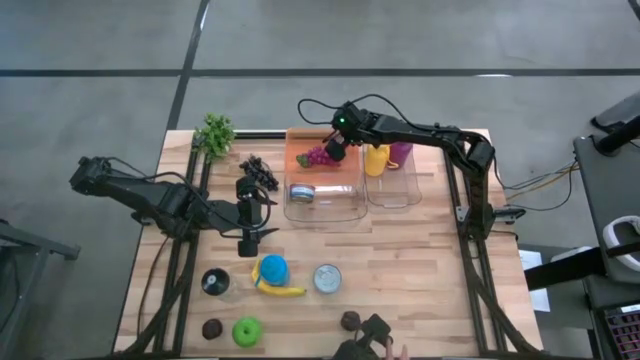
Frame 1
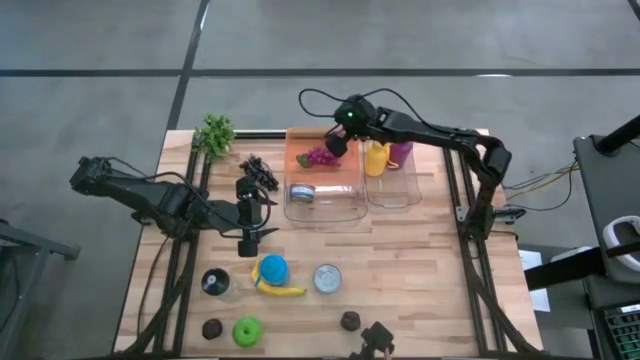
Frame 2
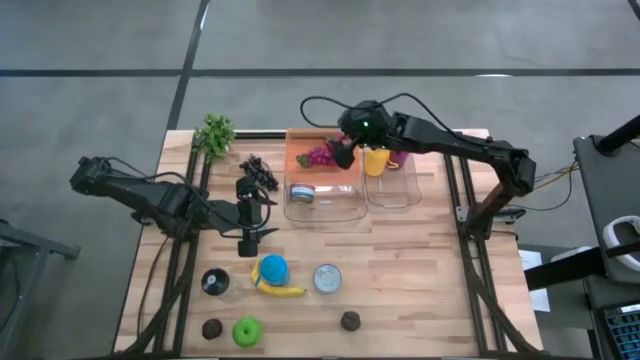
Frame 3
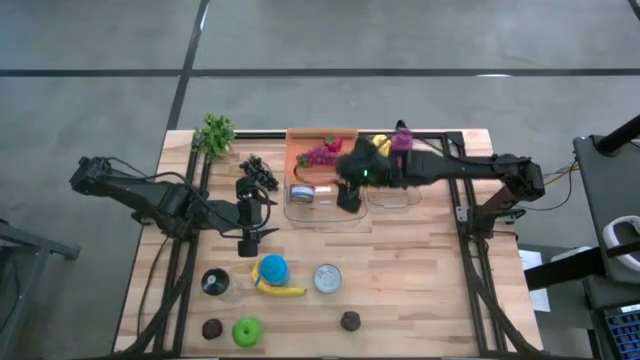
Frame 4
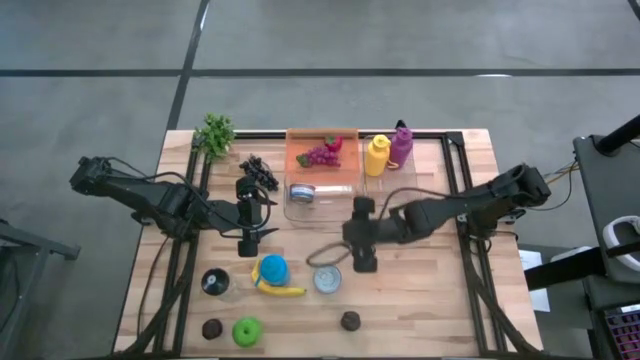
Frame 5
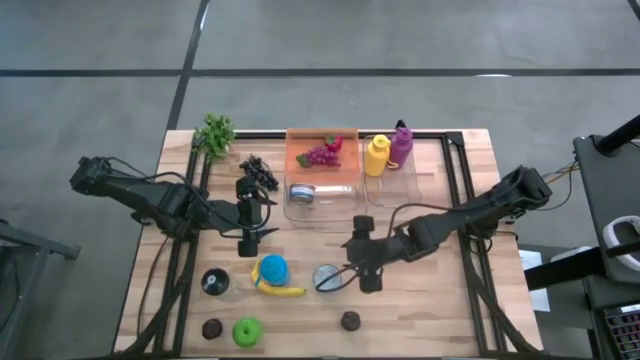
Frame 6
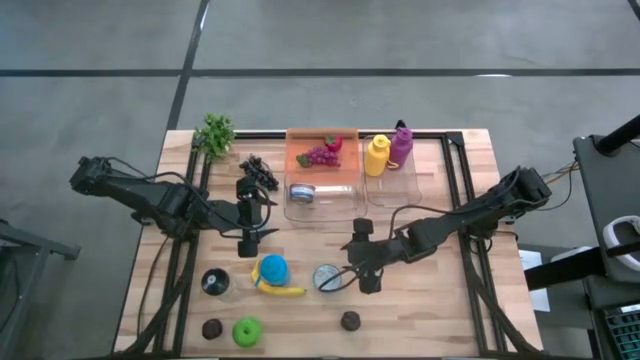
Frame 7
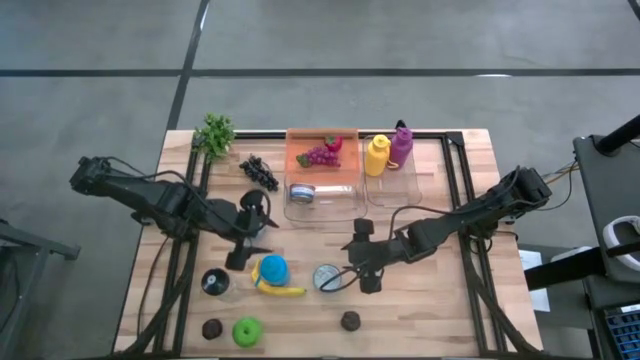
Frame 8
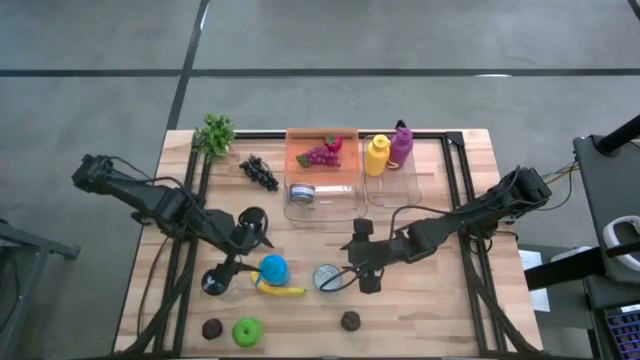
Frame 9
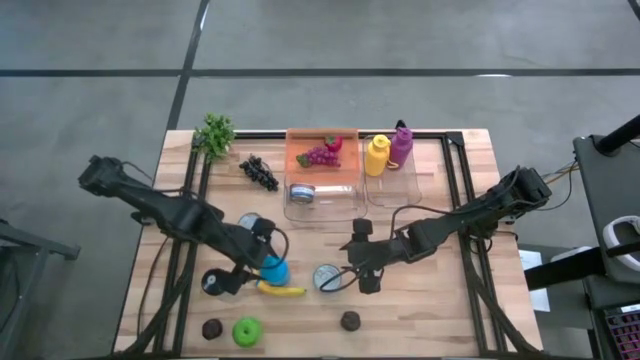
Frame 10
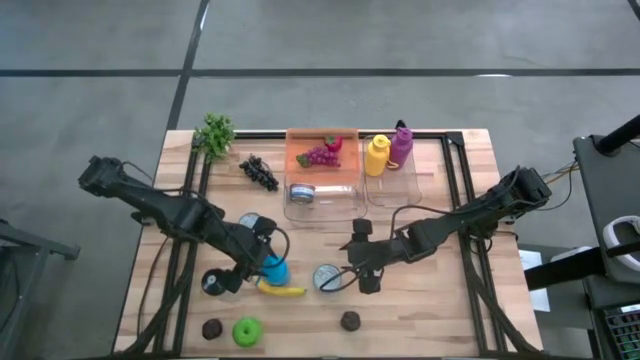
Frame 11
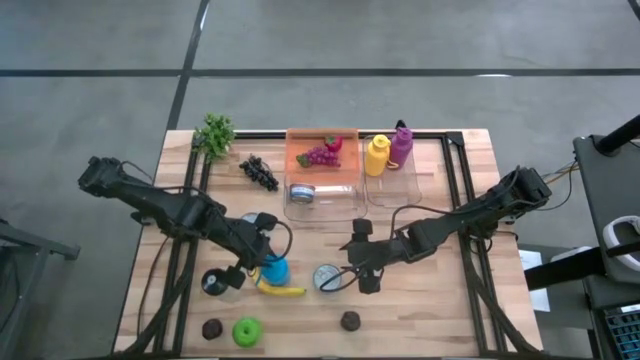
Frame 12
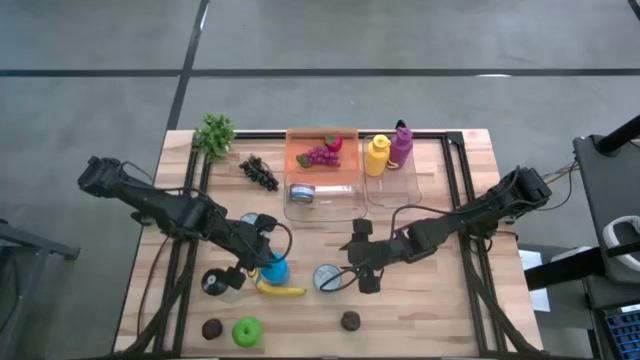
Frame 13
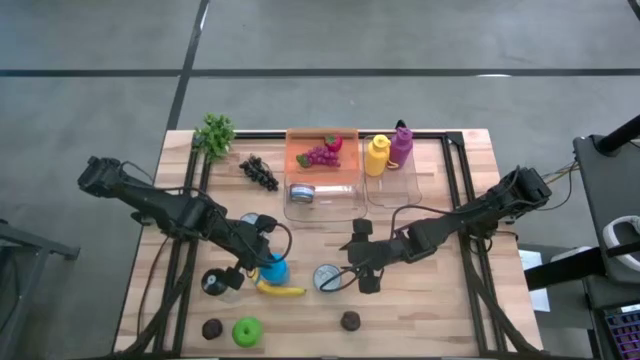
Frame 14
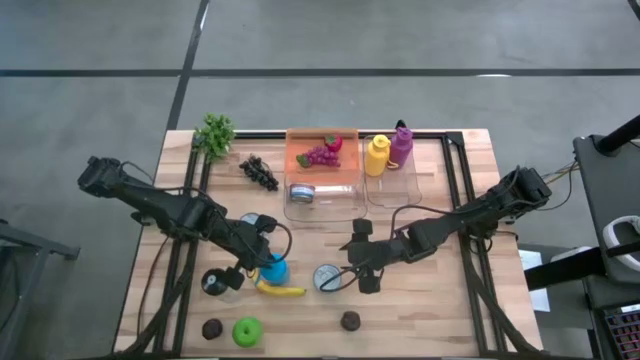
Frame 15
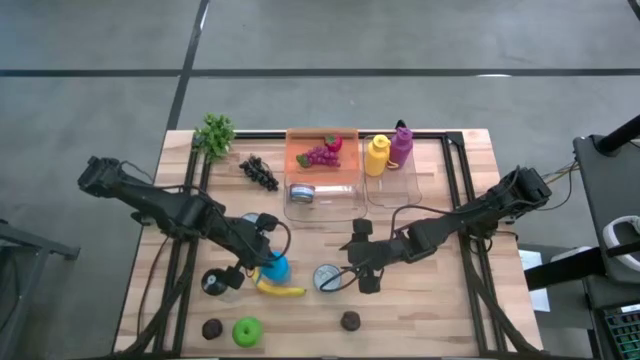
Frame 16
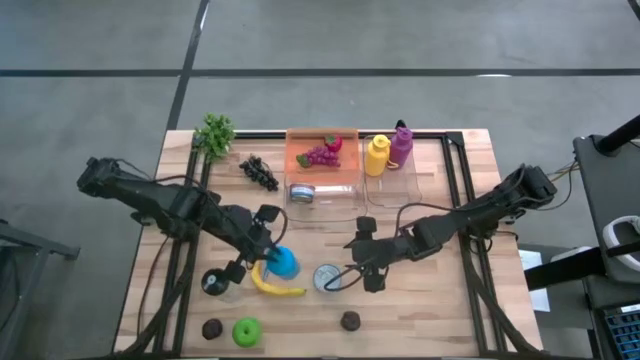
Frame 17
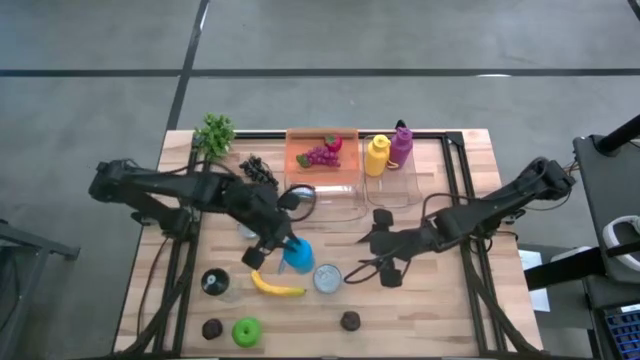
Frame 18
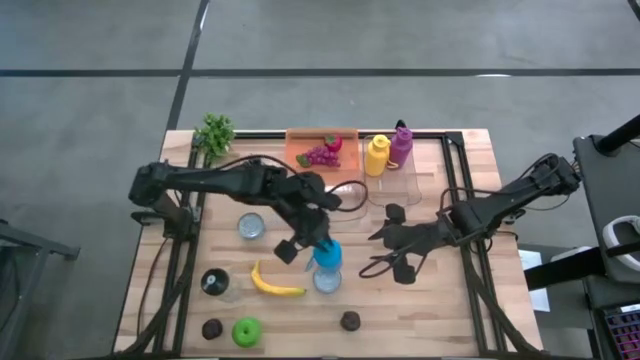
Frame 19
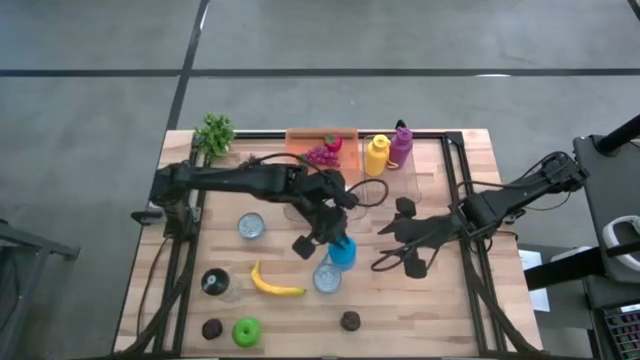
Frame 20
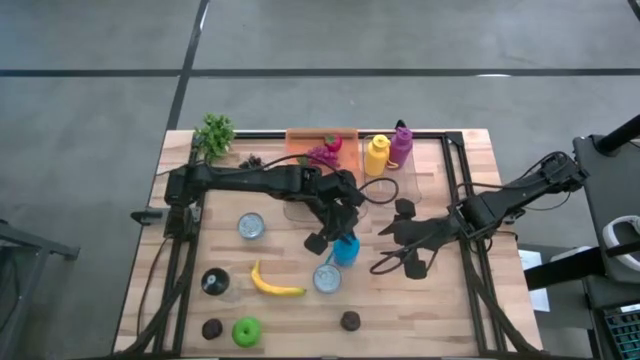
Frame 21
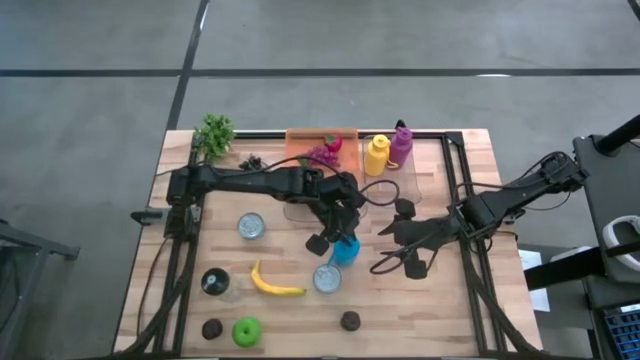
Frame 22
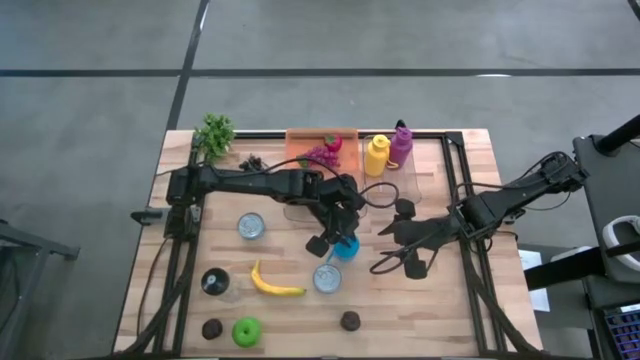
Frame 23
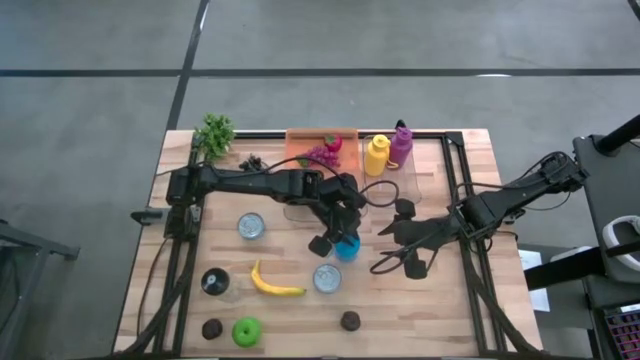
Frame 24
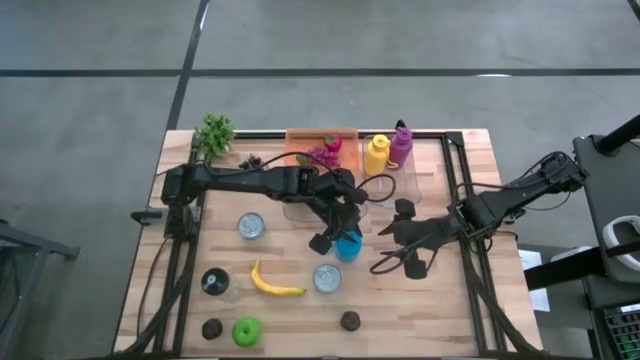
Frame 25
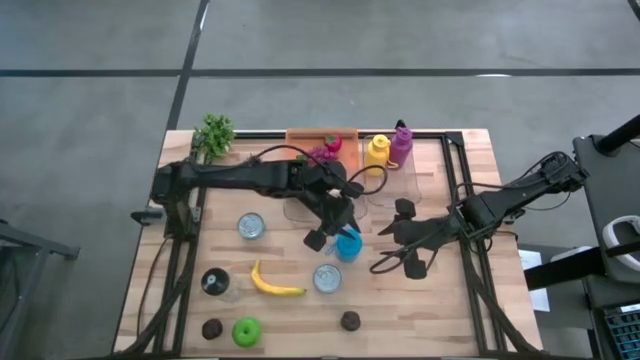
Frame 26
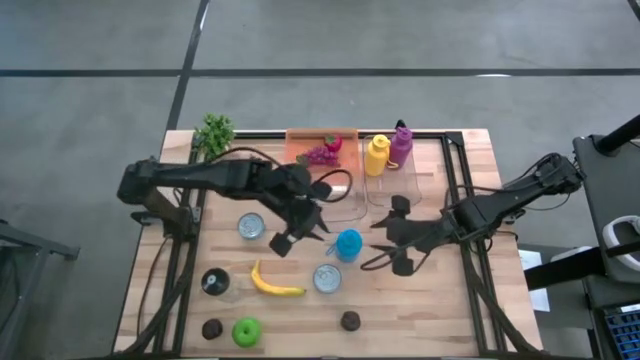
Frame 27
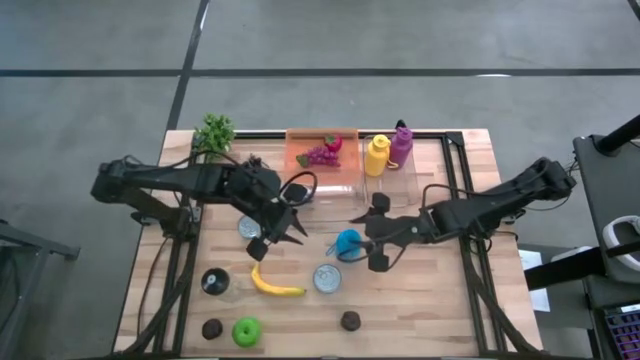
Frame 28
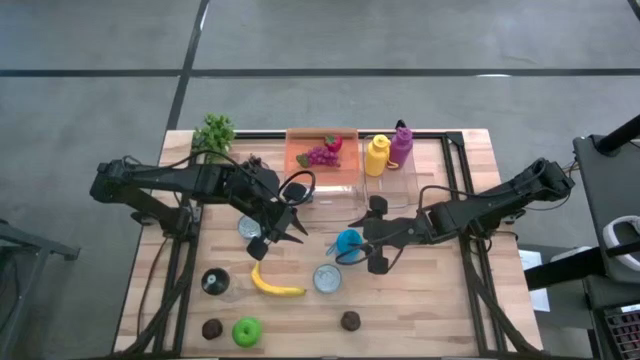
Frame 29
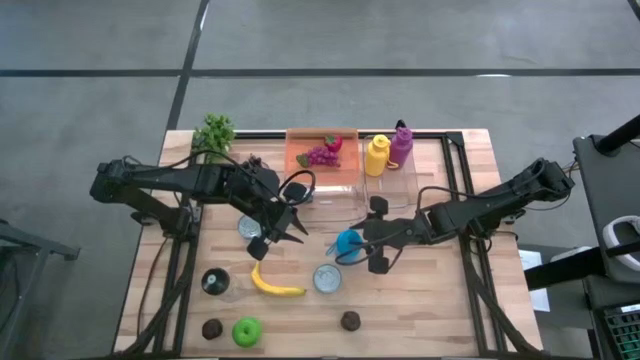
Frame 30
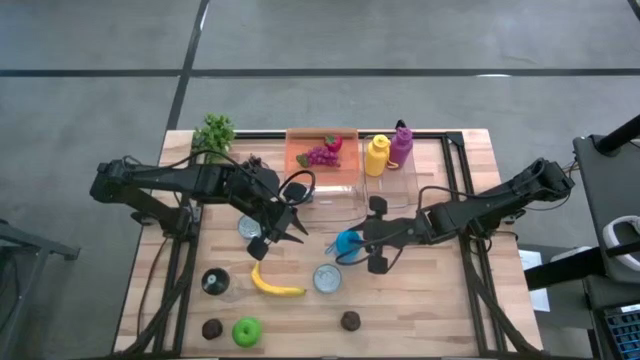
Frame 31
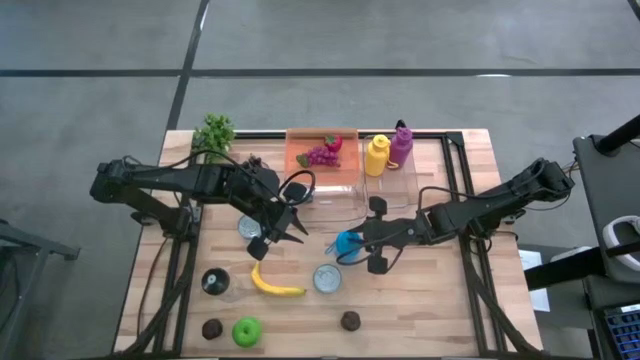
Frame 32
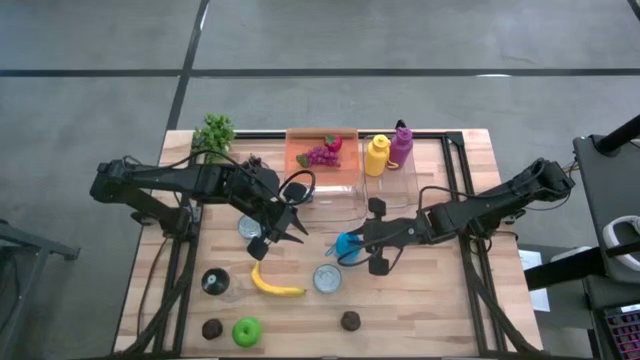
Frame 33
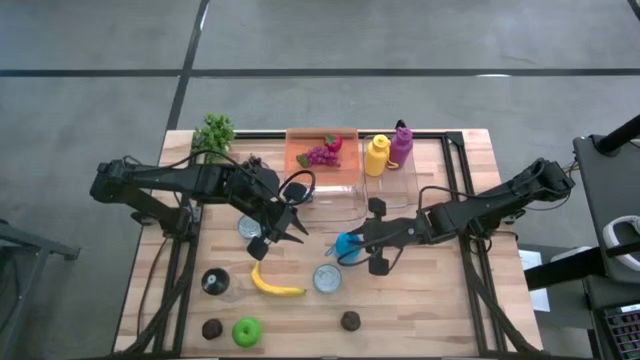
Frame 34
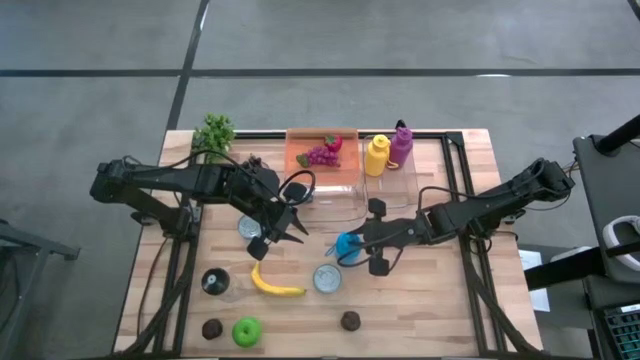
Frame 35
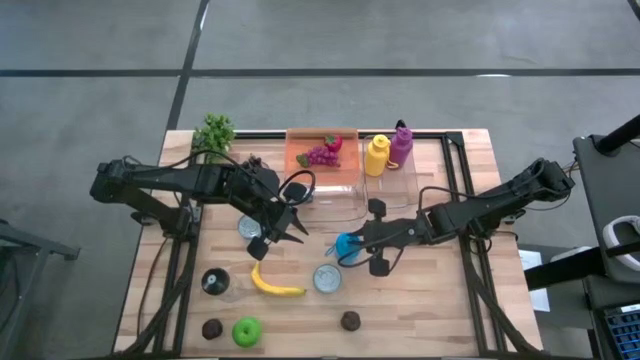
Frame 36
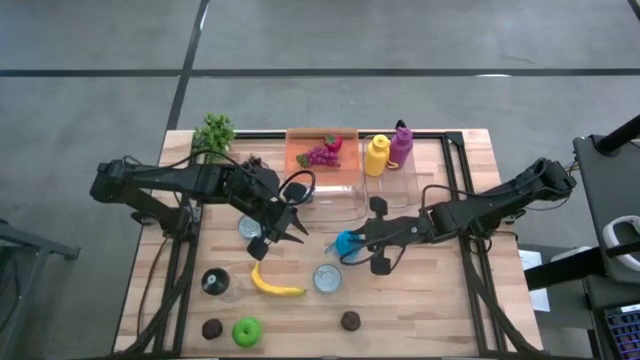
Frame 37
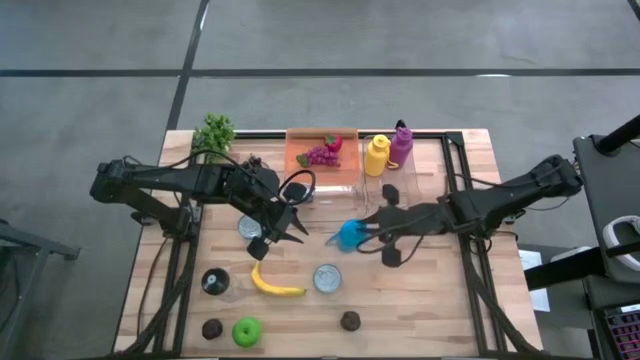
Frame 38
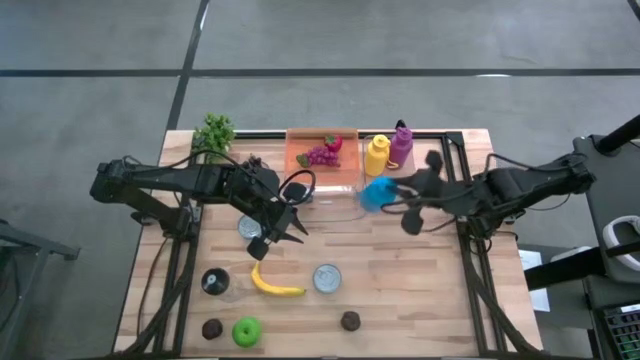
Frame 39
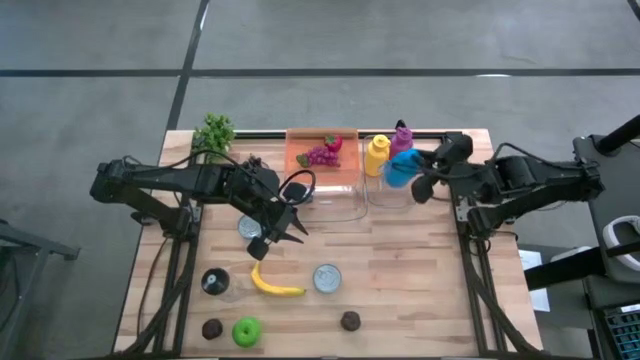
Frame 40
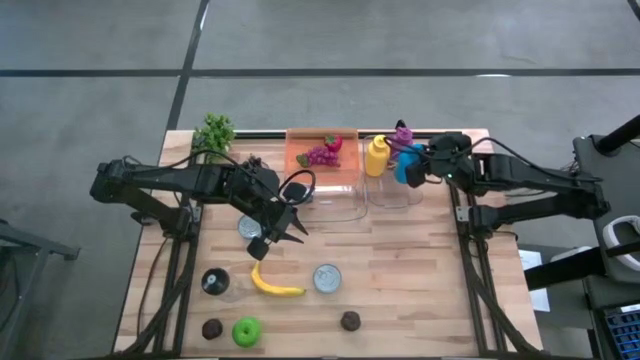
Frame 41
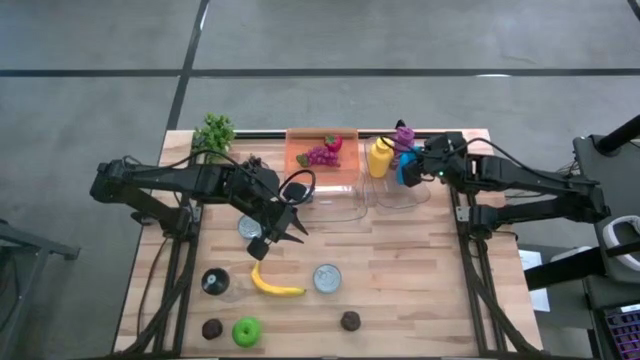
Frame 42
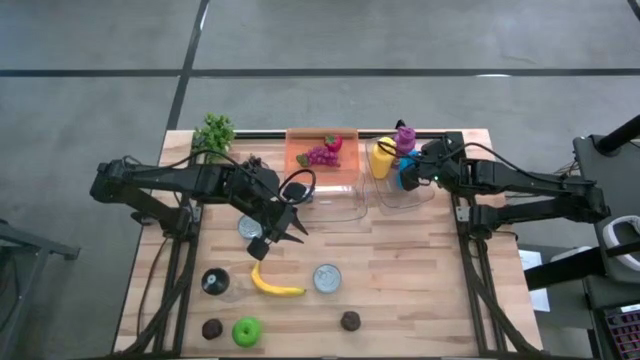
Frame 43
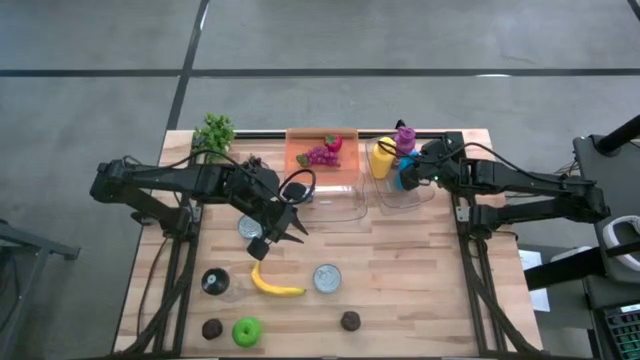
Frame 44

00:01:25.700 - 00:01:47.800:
Task: Pick & Place Food Item
Put the blue water bottle into the right transparent bin
